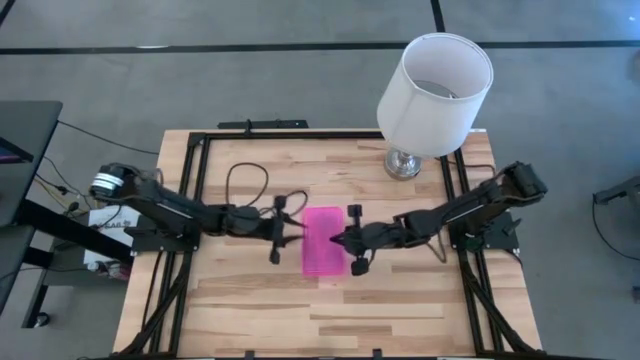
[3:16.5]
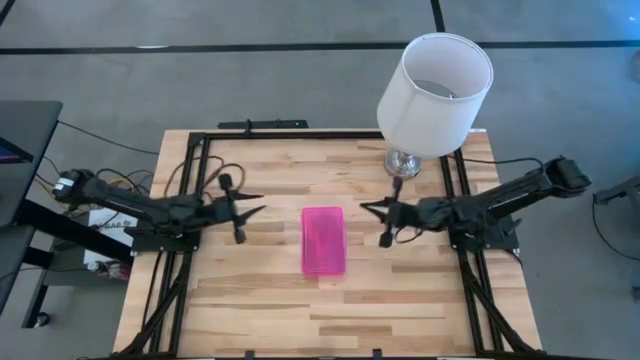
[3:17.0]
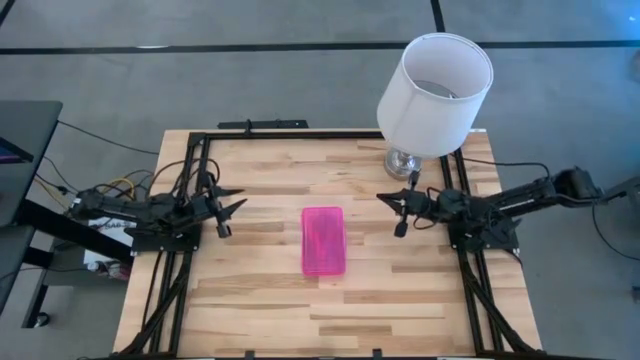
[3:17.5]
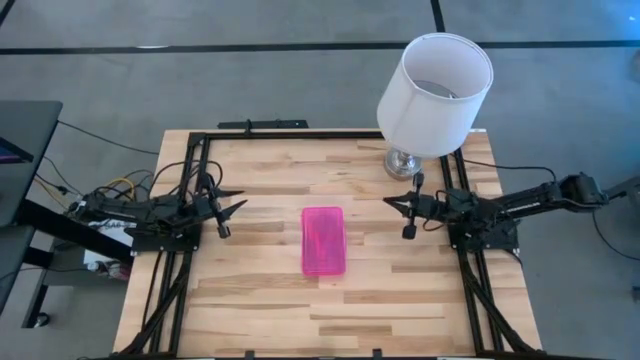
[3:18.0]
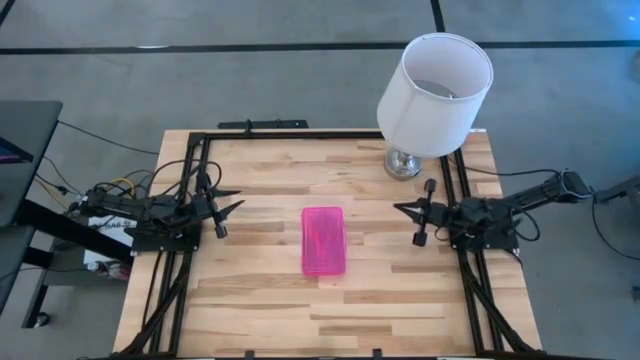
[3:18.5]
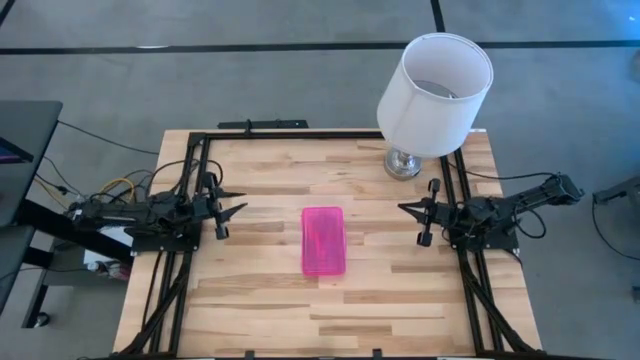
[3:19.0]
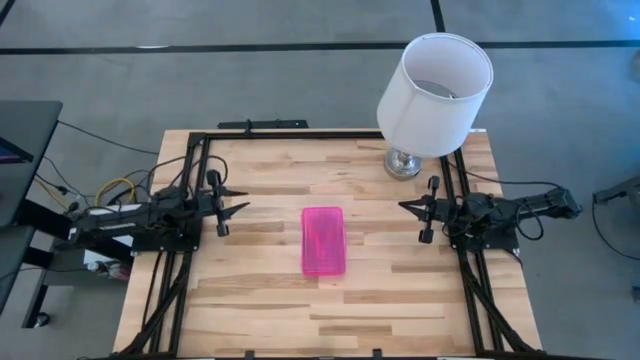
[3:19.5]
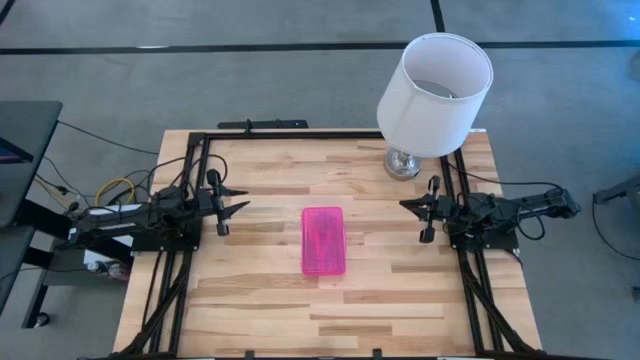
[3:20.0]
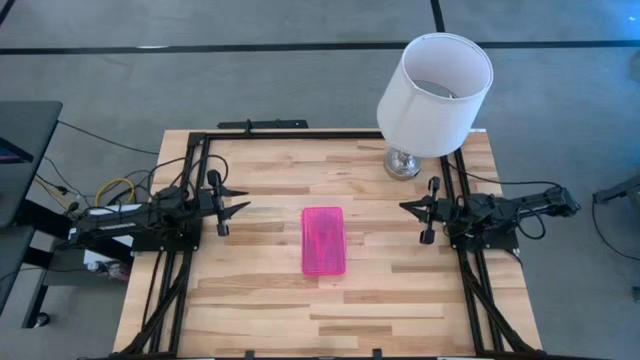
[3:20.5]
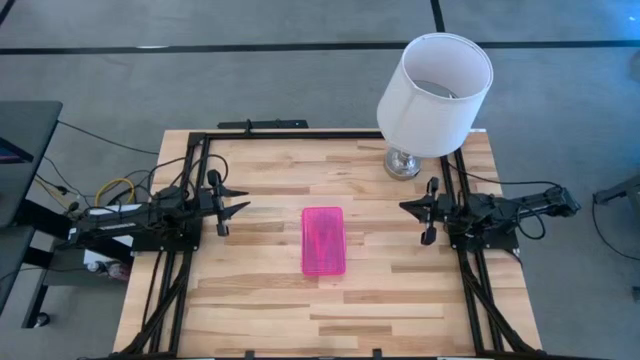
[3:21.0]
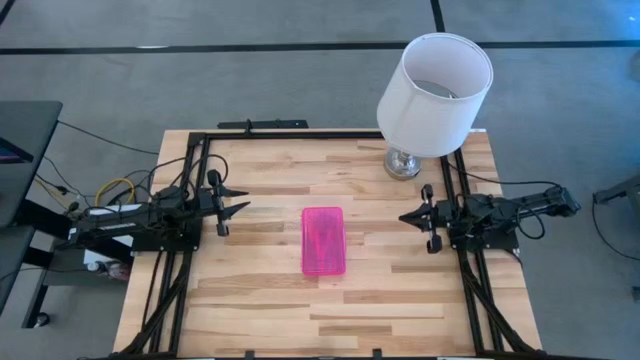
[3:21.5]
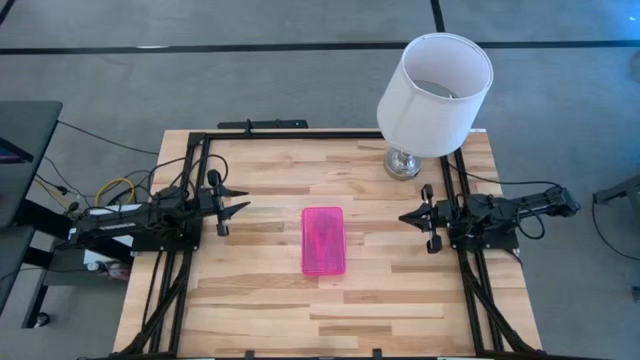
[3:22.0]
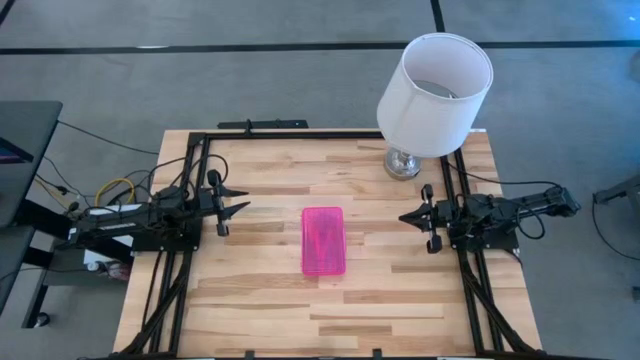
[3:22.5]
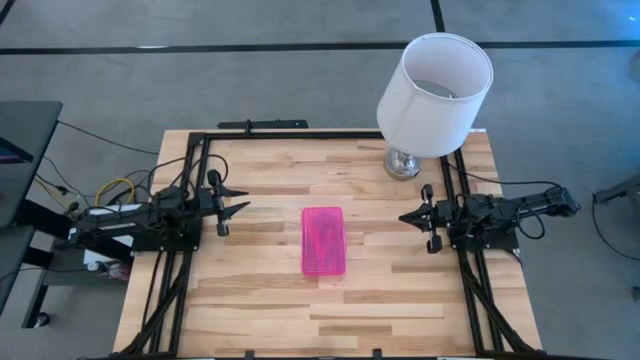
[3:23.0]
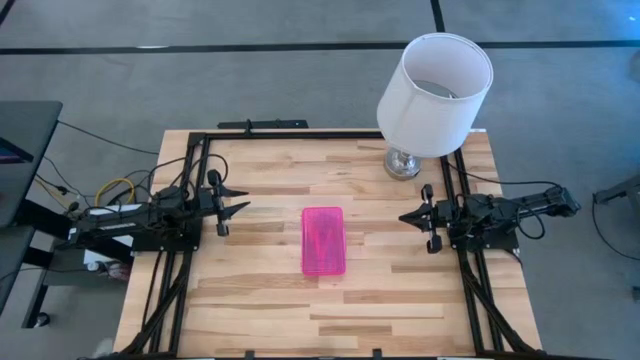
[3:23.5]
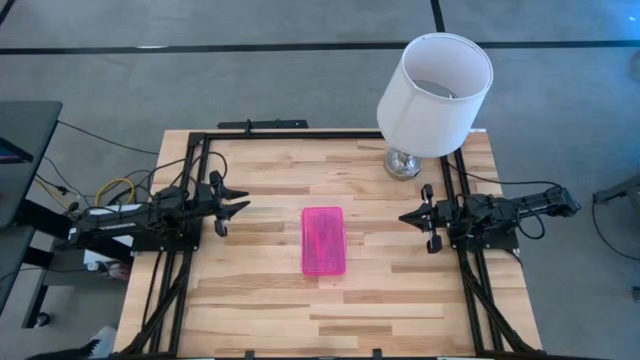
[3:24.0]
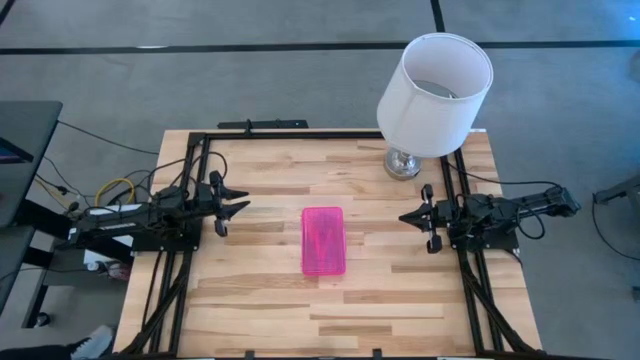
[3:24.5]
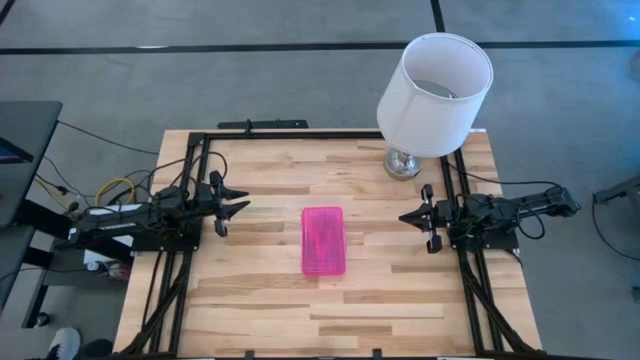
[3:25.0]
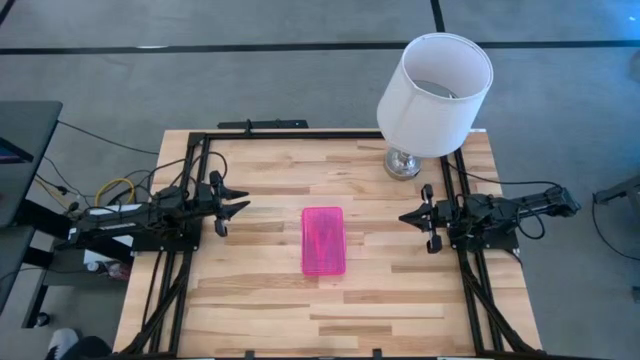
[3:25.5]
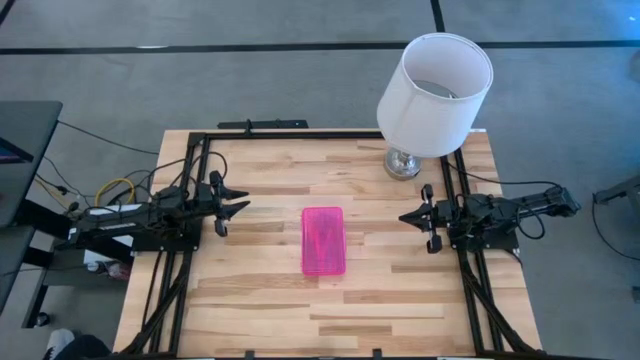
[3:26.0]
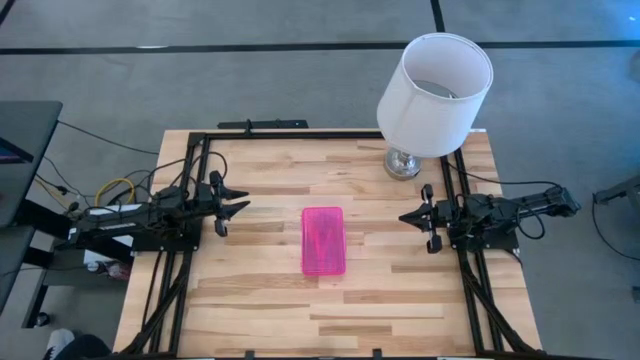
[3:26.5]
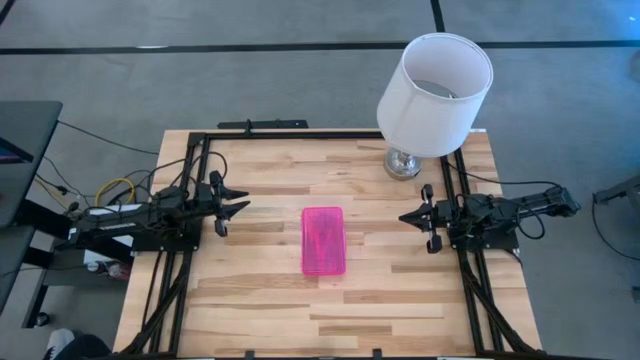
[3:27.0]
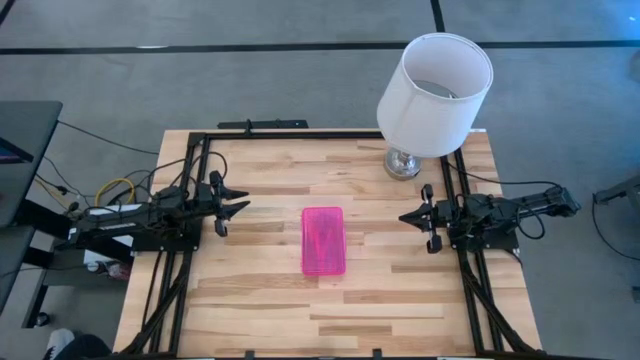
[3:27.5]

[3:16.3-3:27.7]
Task: Pick & place school supplies into a supply box
Return to Home Position

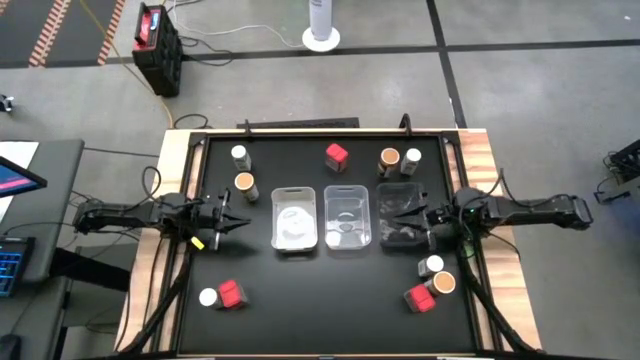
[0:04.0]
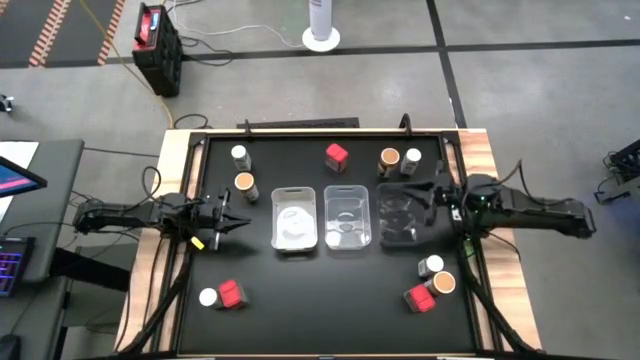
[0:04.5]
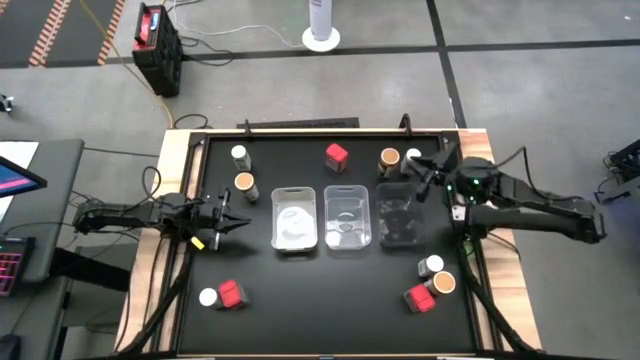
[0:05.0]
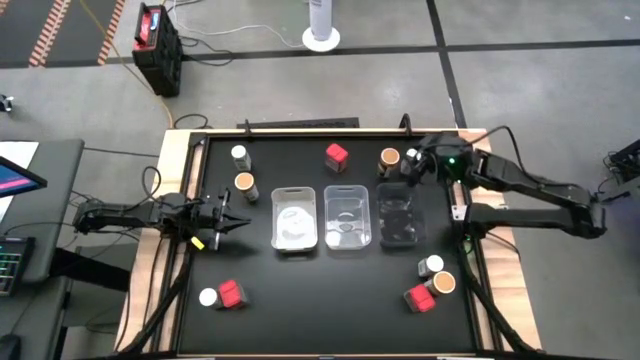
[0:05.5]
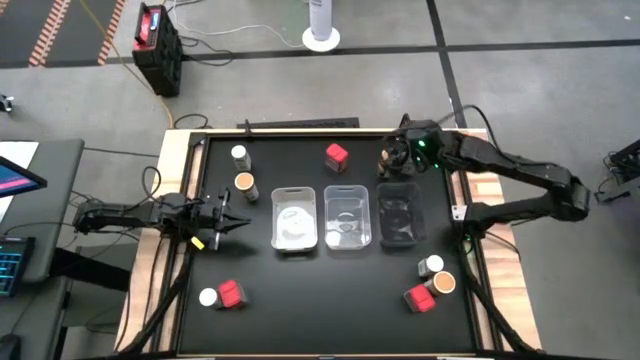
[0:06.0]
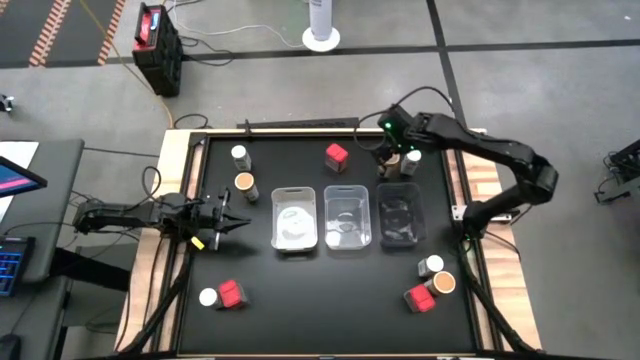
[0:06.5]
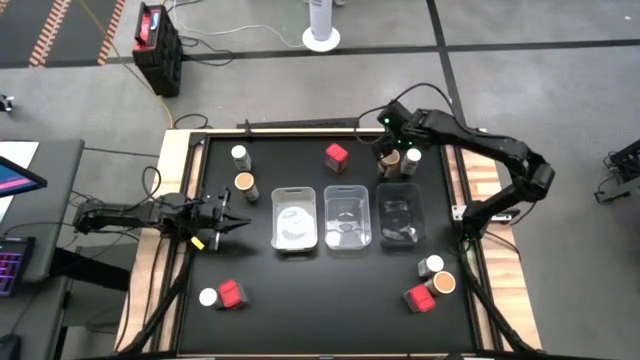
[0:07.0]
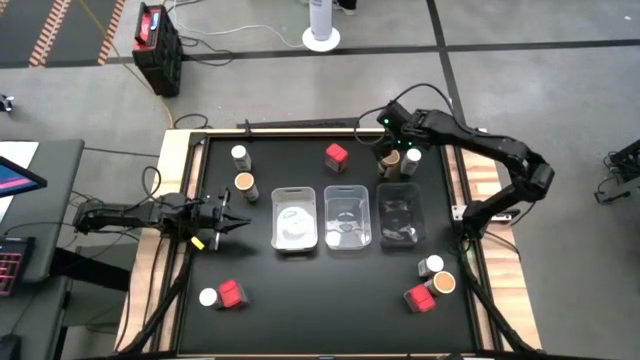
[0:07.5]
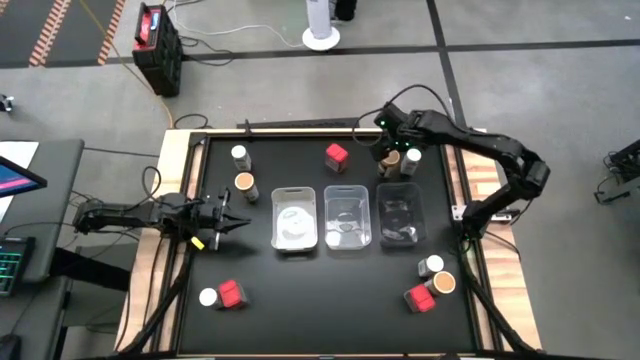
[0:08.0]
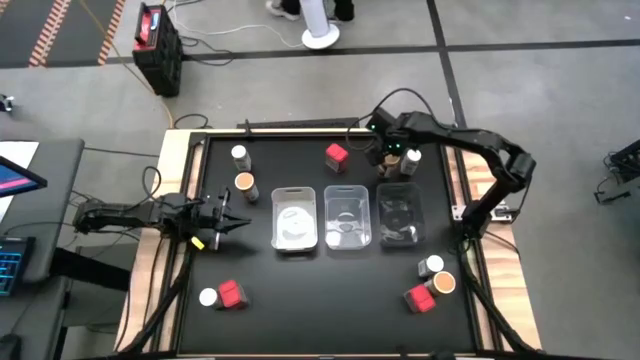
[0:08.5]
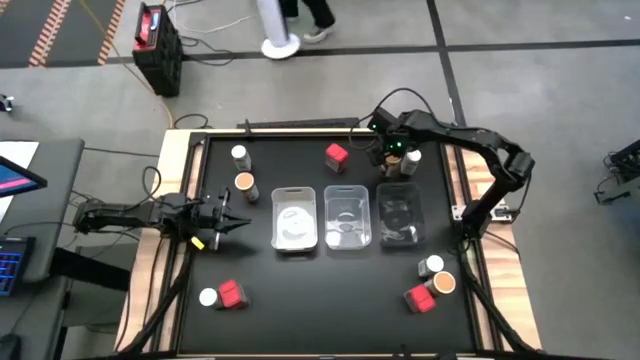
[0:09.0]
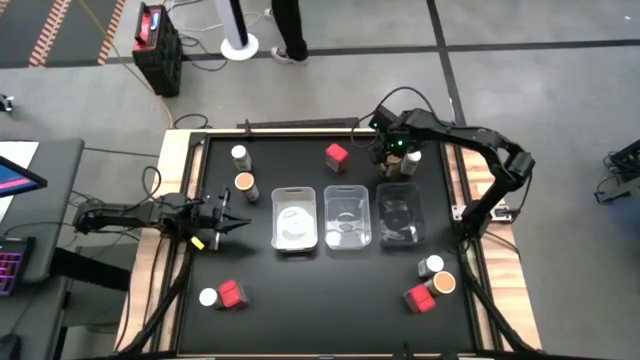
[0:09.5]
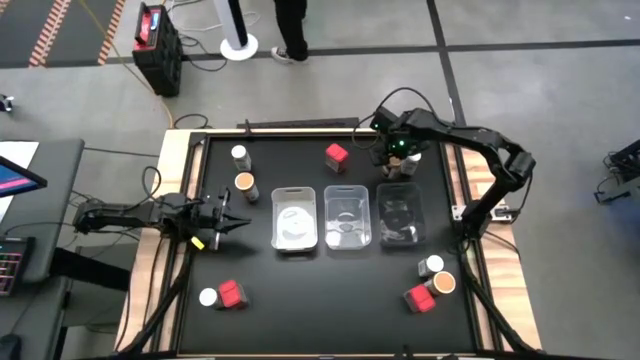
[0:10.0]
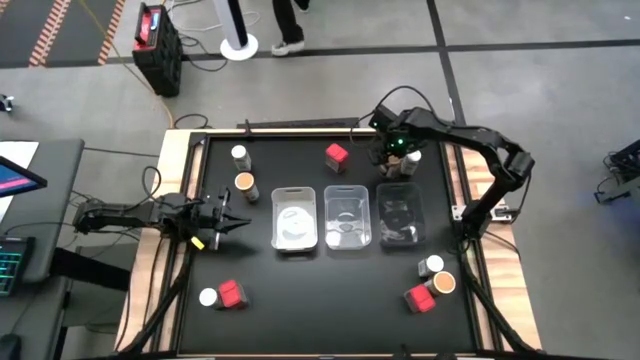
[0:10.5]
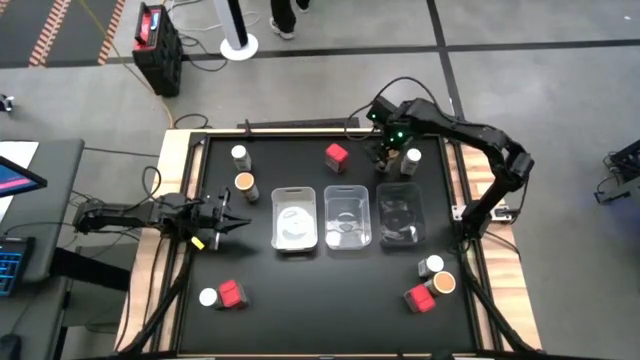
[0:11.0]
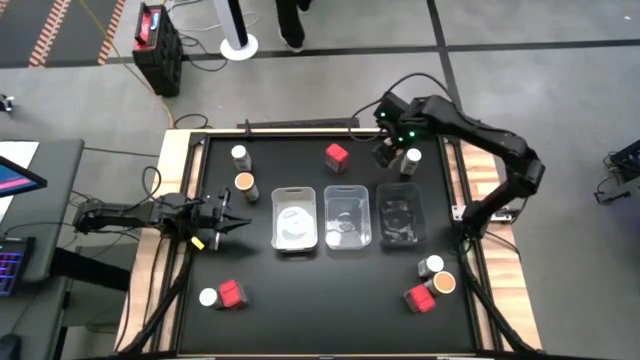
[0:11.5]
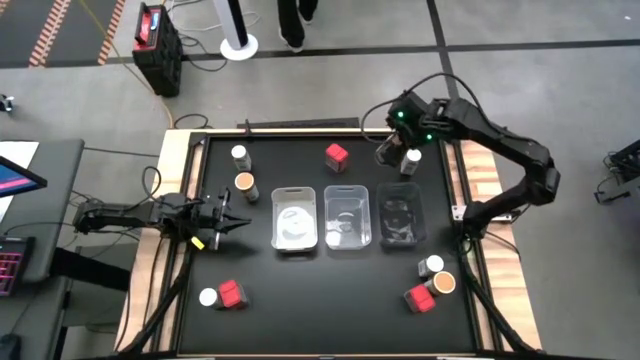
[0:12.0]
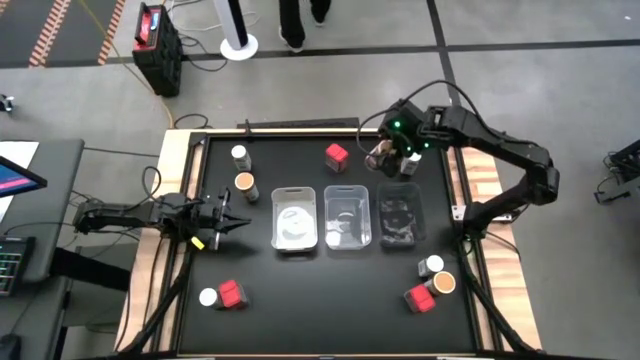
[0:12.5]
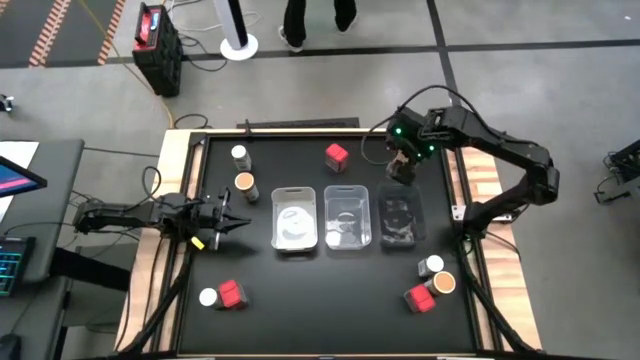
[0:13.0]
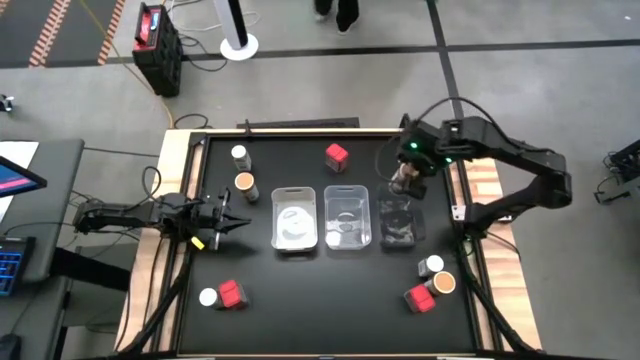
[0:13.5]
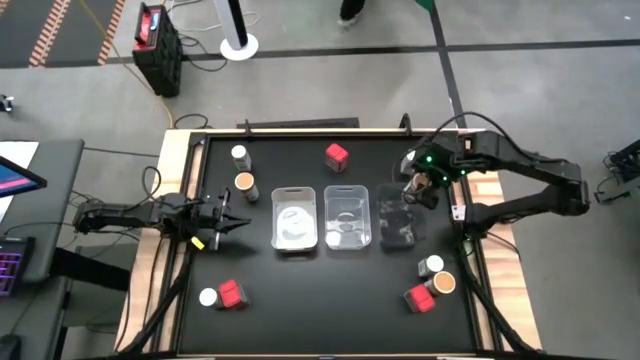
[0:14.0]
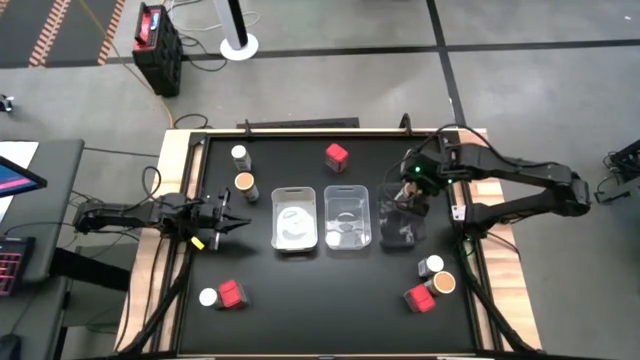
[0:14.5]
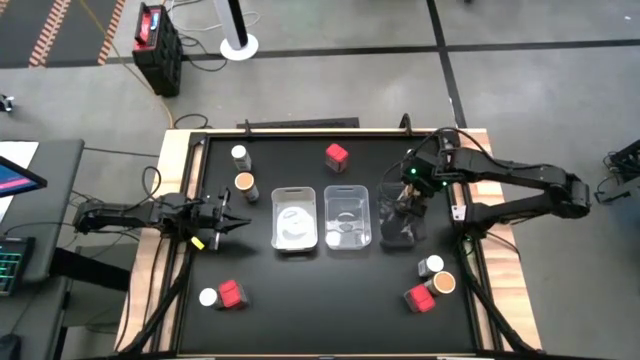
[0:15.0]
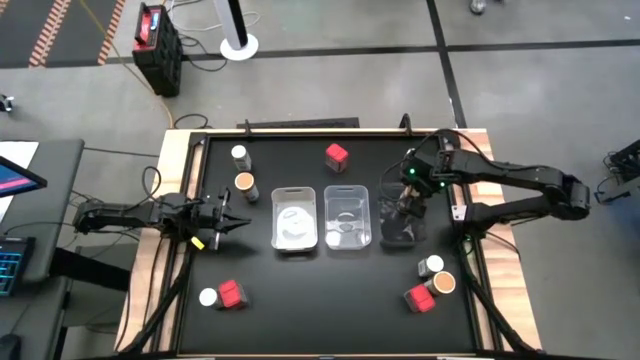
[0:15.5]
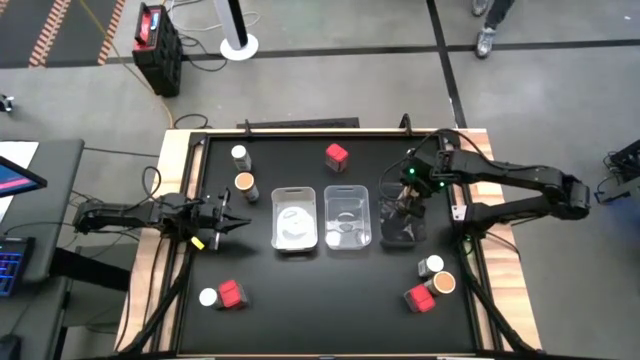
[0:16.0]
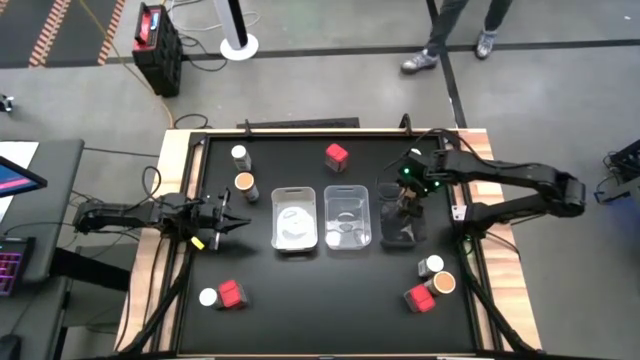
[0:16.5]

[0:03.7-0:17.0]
Task: Sort spices by type
Put the top right brown seasoning bottle into the black bin
